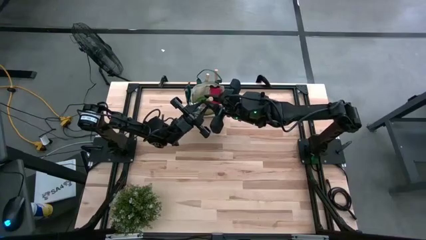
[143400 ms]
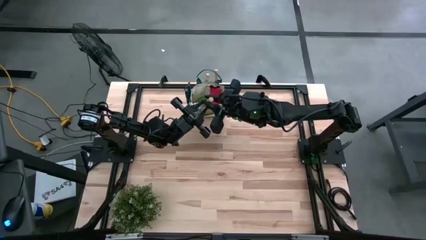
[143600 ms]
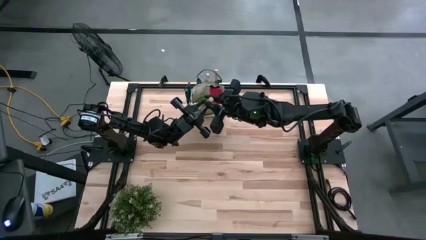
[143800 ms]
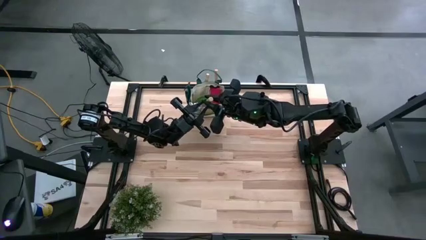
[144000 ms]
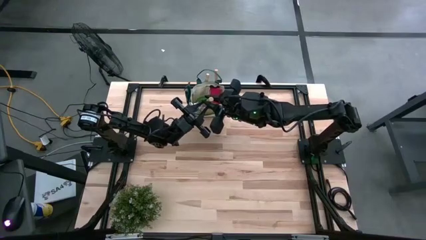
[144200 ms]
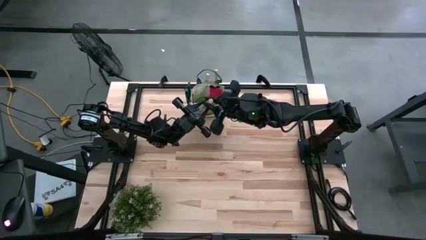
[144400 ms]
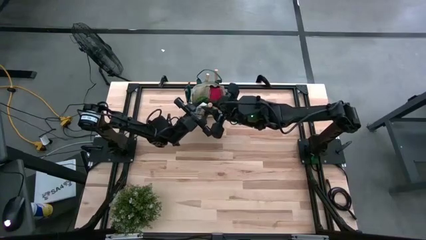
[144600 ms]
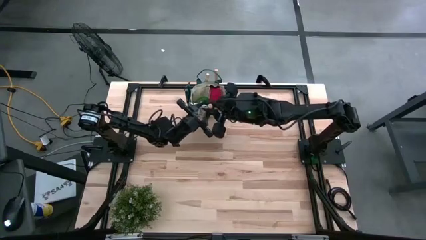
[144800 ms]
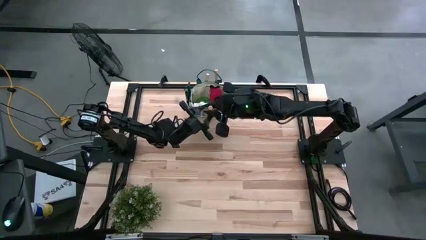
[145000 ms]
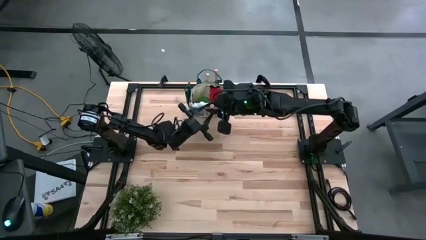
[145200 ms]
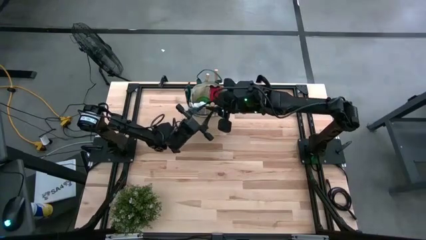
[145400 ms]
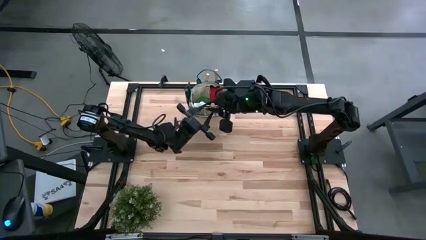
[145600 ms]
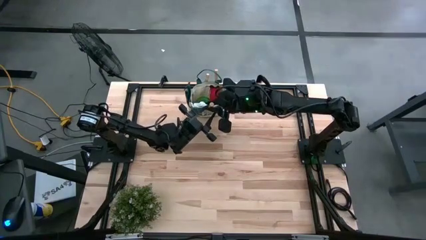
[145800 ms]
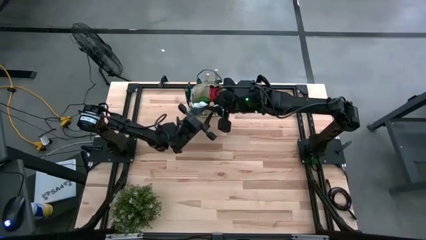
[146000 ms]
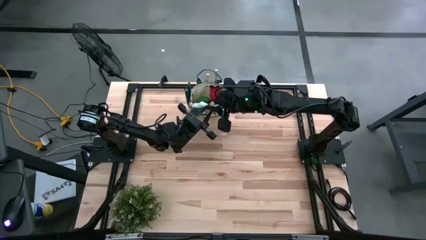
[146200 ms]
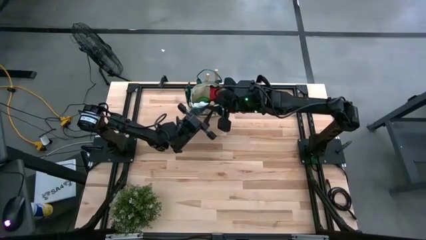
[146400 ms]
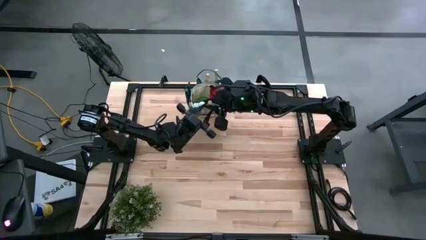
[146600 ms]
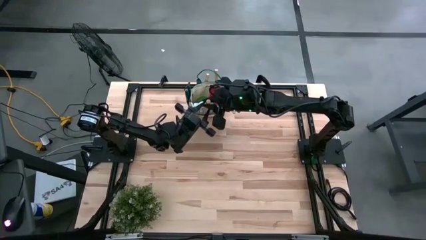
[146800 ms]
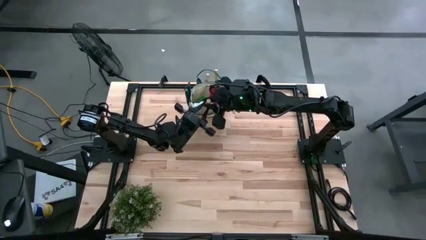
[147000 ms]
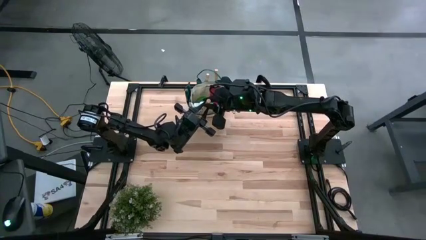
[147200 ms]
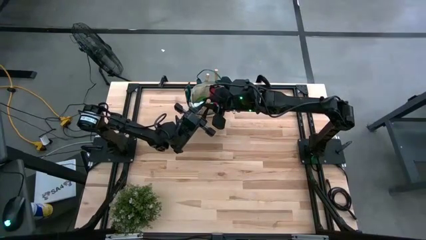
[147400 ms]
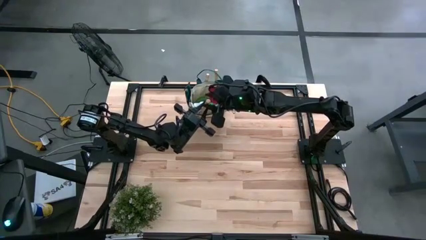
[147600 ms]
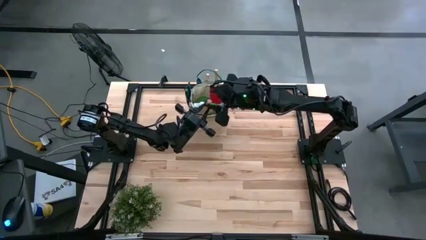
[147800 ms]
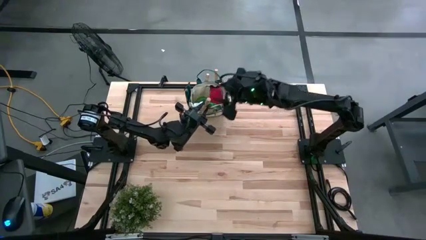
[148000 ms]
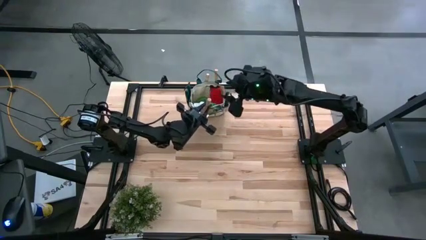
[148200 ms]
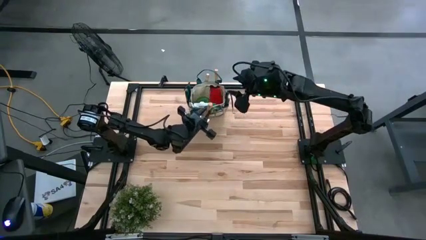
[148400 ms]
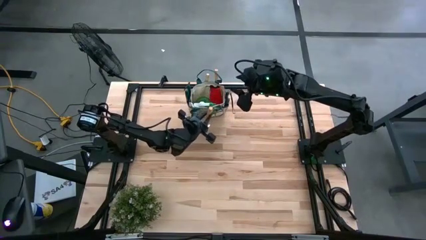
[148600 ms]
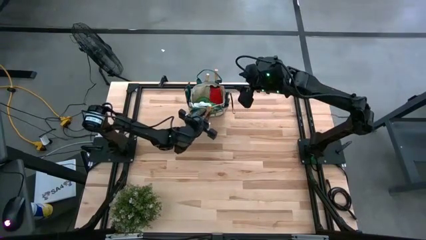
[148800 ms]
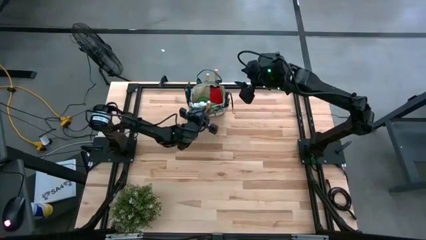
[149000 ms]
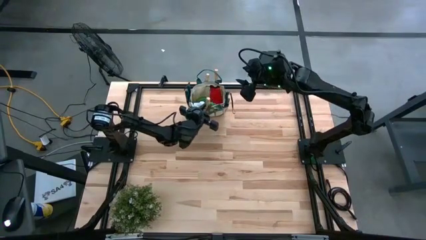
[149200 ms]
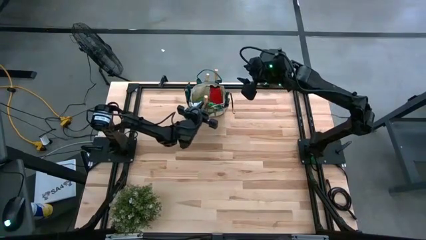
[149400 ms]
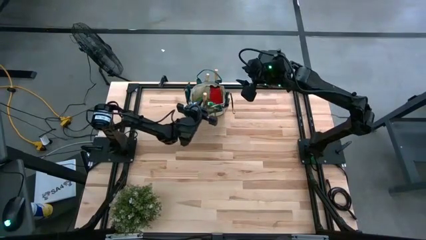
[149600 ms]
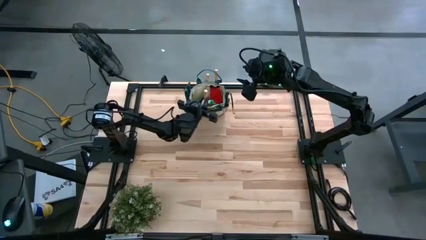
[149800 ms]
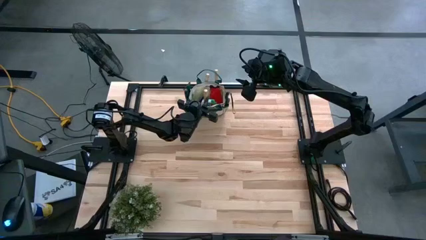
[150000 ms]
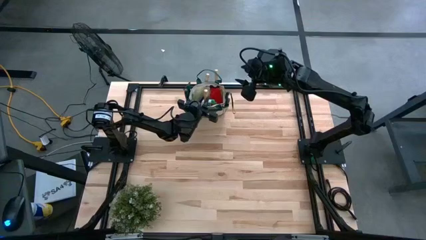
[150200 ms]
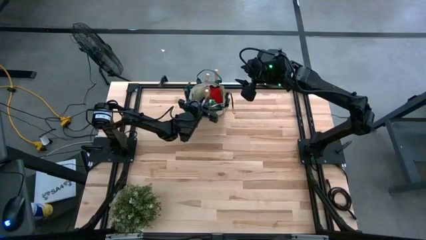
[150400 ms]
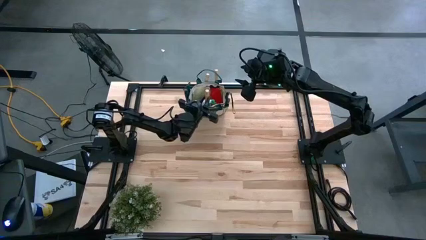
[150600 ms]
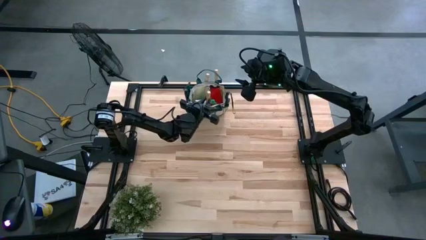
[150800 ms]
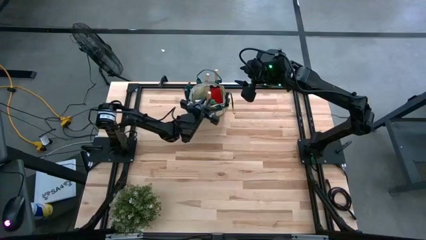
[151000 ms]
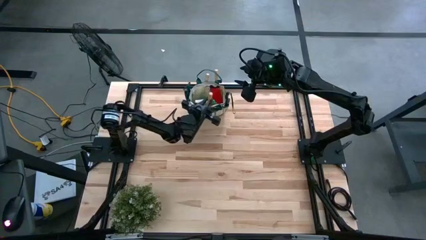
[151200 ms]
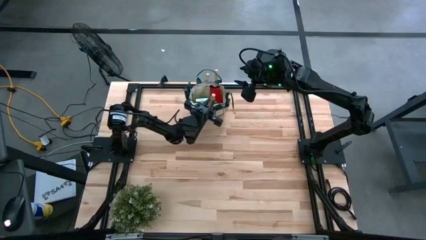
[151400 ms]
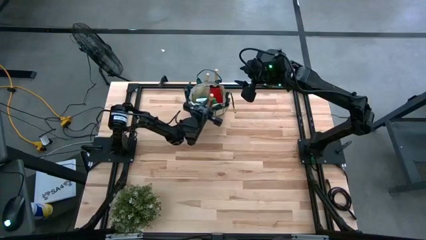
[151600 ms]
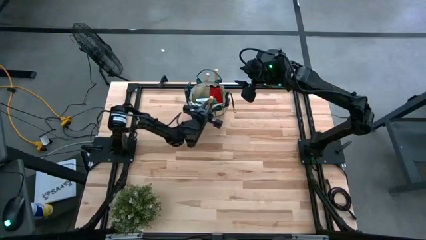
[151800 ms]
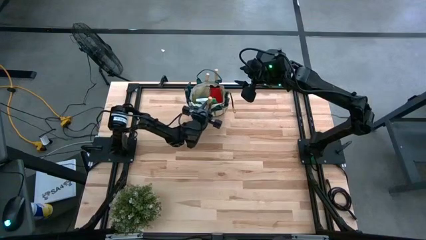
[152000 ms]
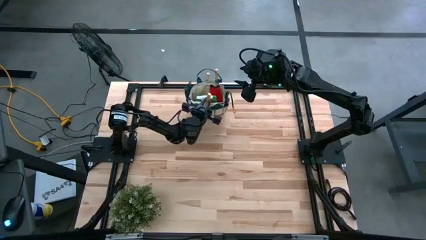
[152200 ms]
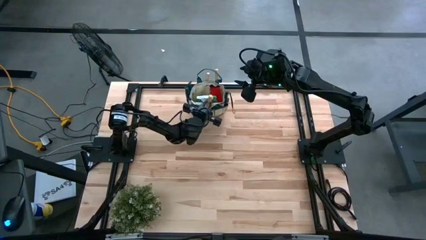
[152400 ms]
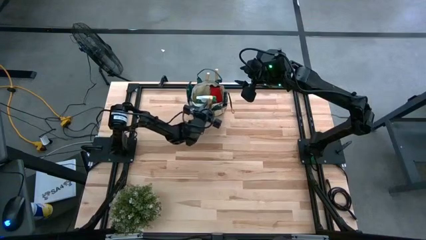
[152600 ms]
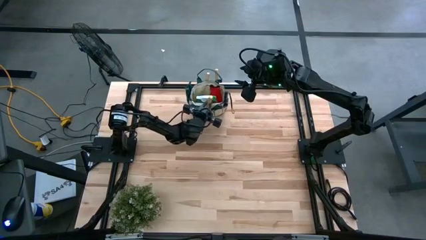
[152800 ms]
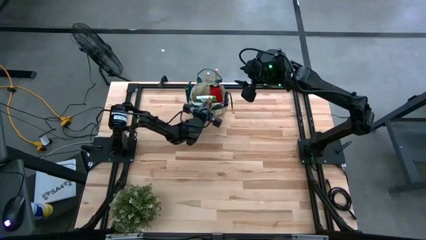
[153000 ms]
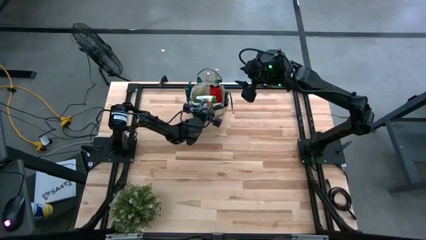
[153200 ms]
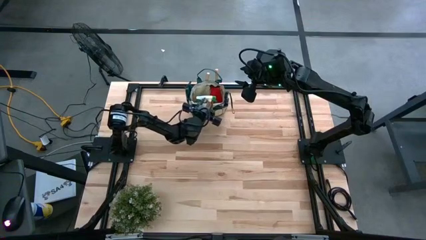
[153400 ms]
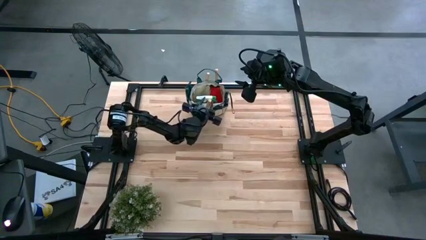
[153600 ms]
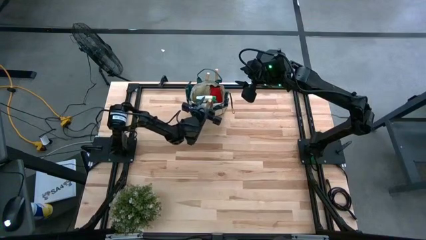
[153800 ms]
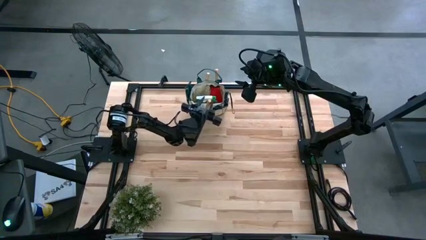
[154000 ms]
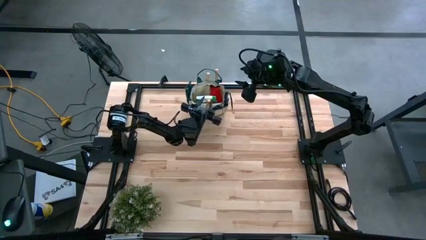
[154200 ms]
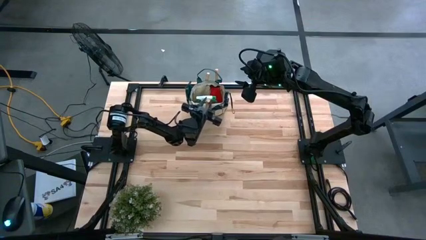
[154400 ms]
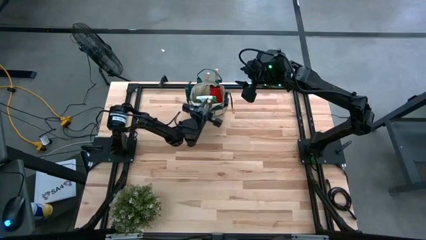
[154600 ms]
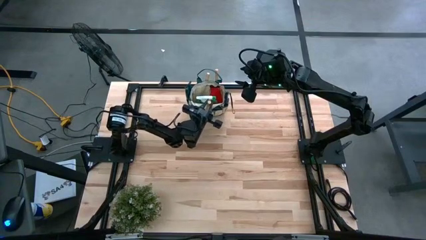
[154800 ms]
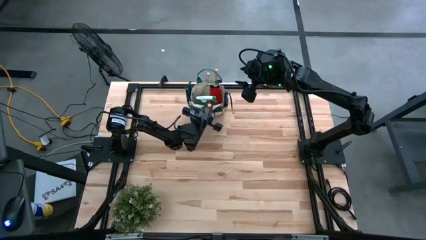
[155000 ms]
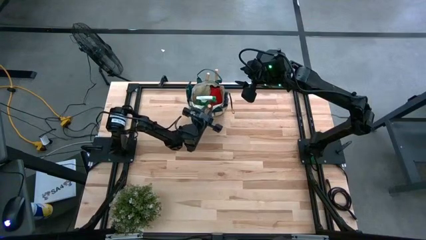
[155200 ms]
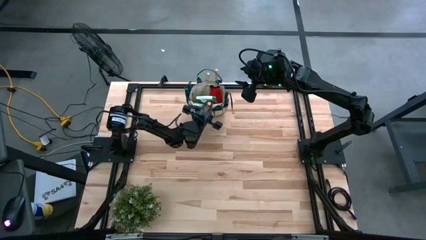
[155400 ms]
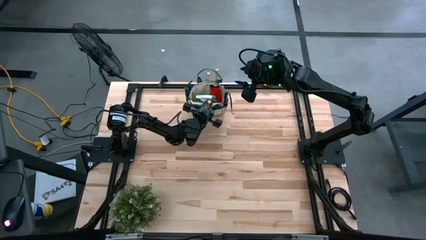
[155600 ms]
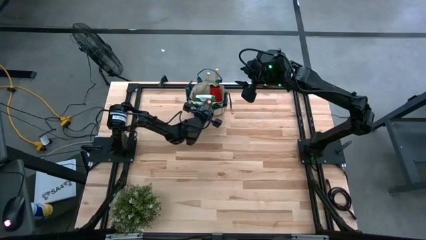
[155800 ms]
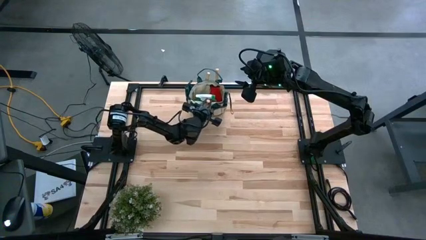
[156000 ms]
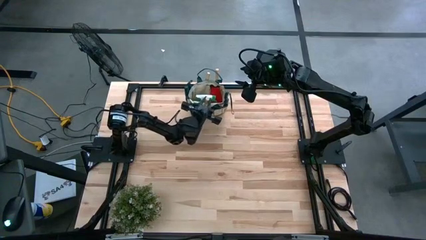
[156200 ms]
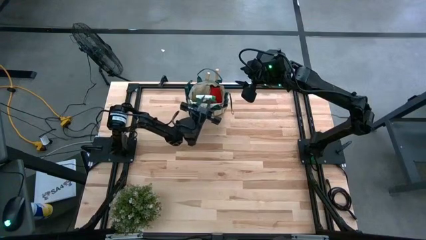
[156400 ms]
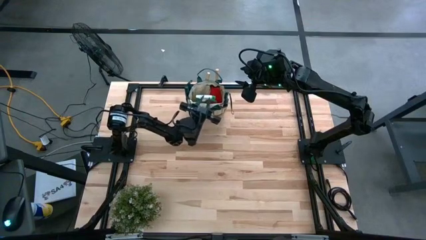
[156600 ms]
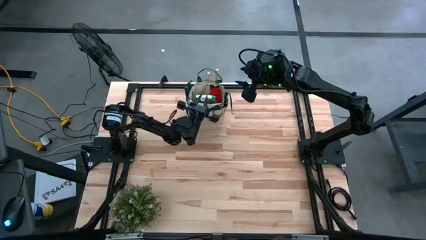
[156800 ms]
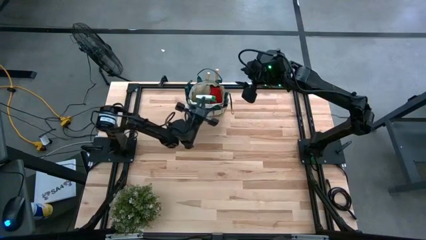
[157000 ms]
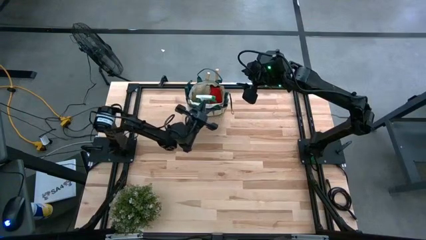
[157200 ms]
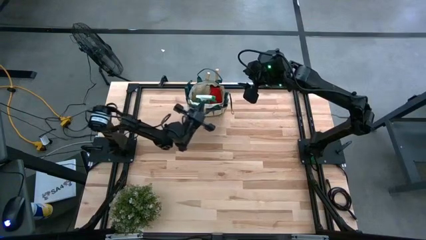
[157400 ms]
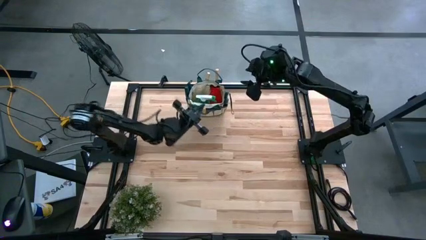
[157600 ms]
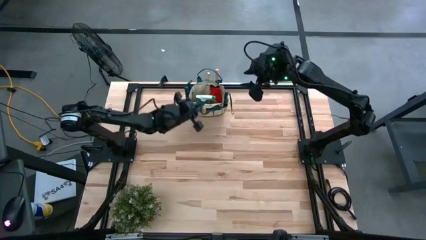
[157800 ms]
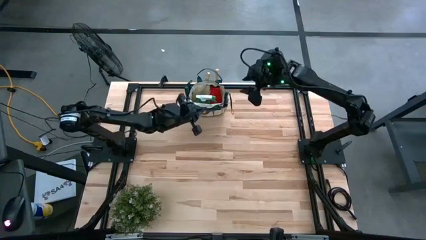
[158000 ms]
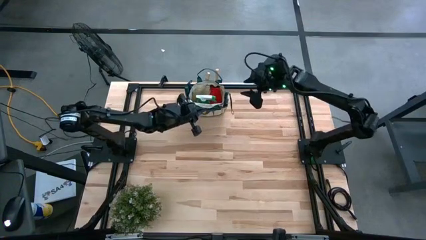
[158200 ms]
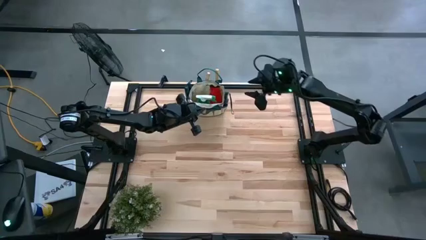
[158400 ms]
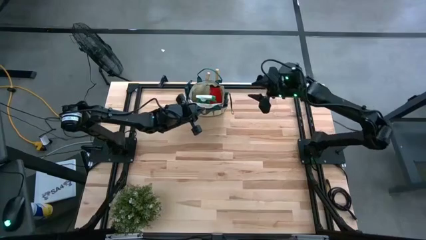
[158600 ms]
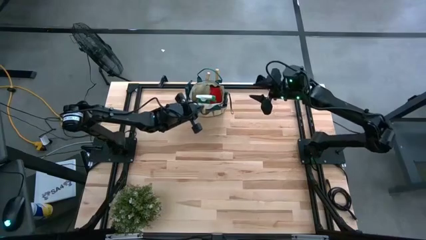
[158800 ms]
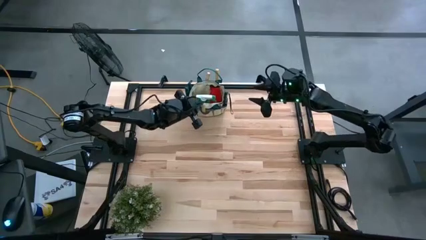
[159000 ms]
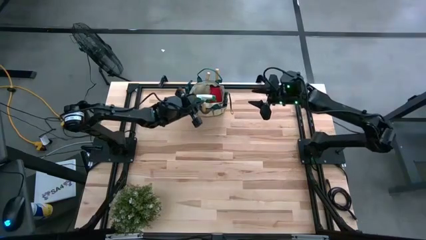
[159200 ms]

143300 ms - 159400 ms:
Task: Pick & Place Garden tools in Gardening bag
Put the brown hand rake into the gardening bag

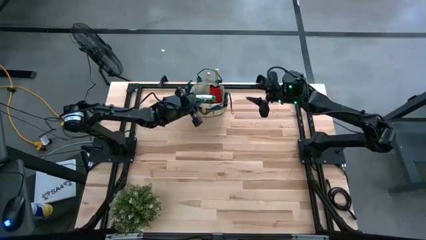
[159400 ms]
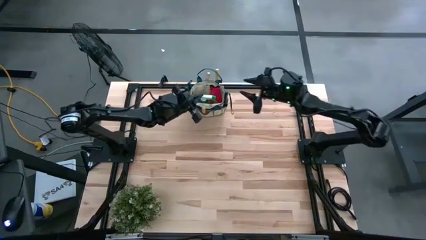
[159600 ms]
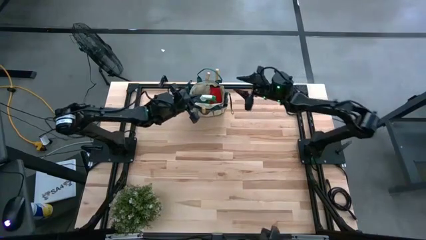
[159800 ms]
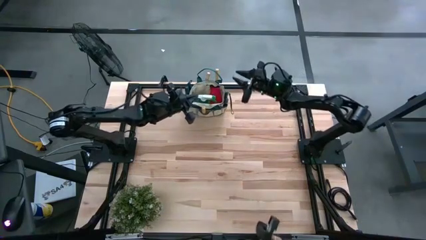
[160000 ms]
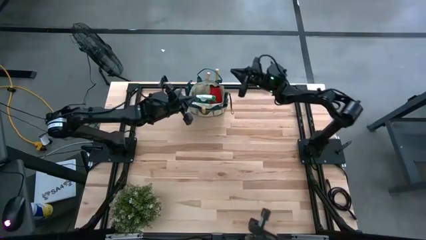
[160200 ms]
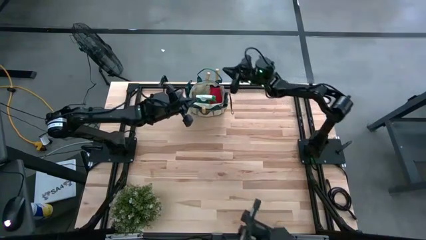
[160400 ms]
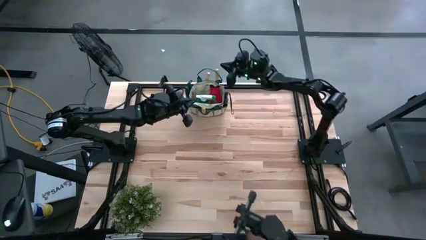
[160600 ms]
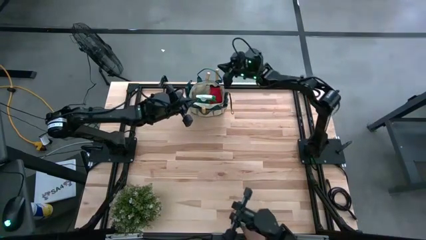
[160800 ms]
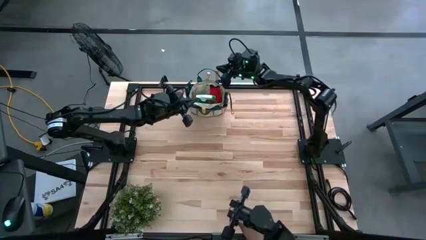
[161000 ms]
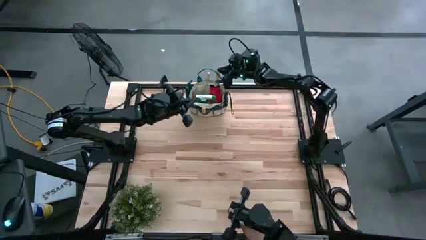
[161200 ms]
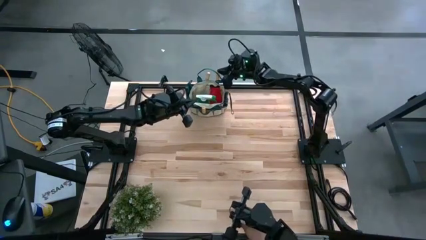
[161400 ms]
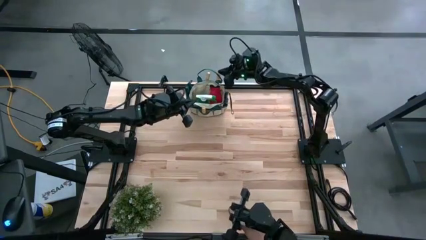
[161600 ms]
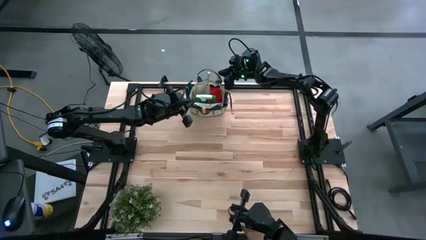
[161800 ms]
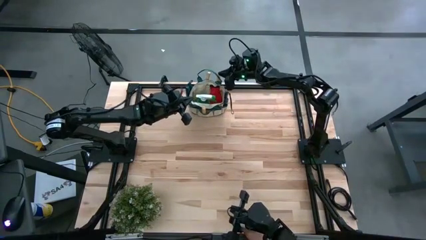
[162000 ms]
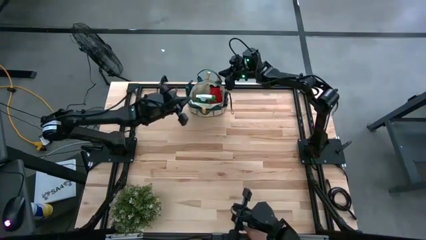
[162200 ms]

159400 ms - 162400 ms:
Adjust the brown trowel
